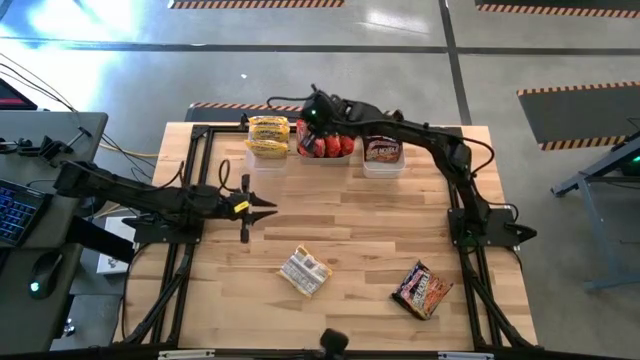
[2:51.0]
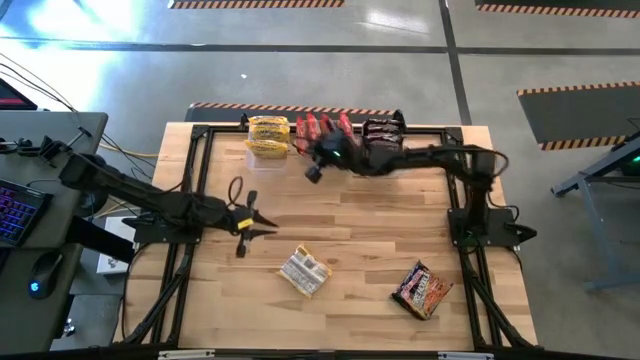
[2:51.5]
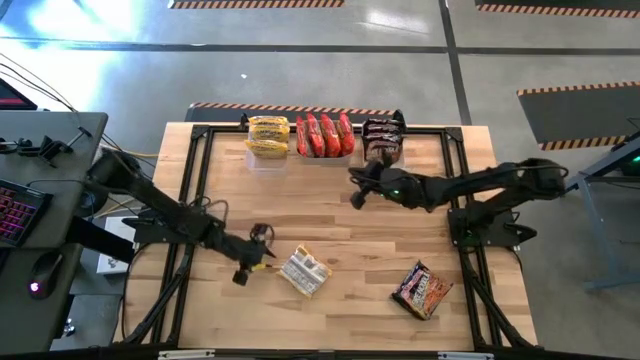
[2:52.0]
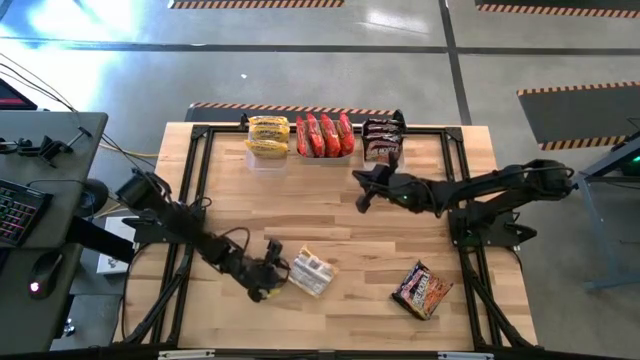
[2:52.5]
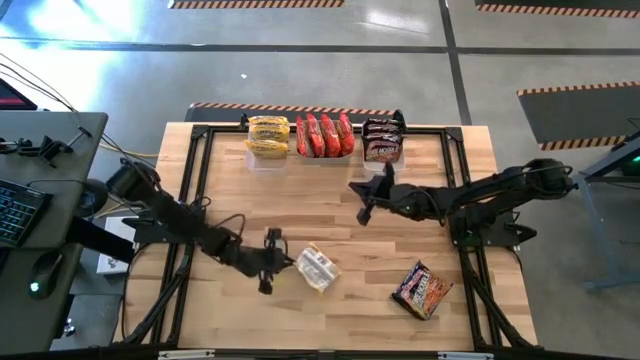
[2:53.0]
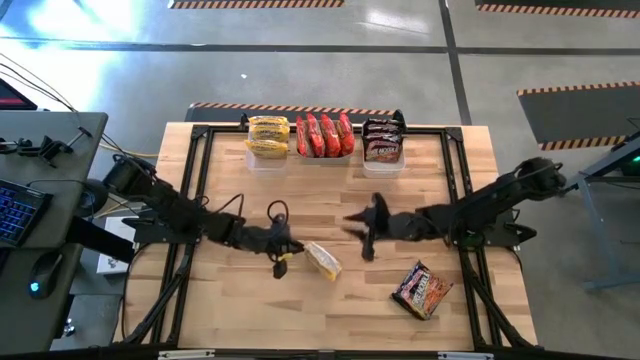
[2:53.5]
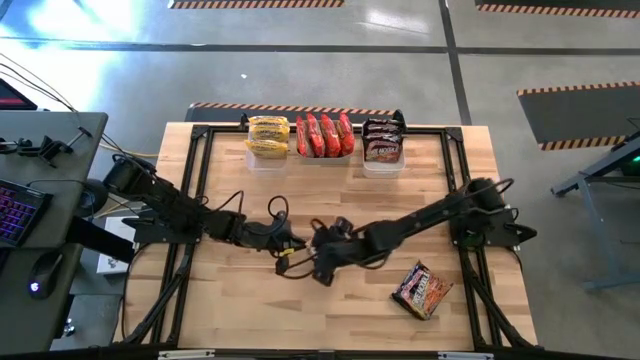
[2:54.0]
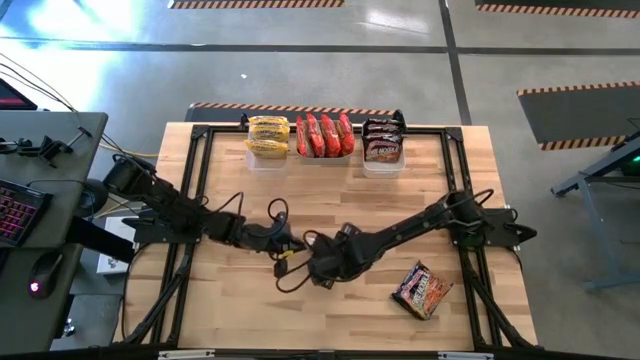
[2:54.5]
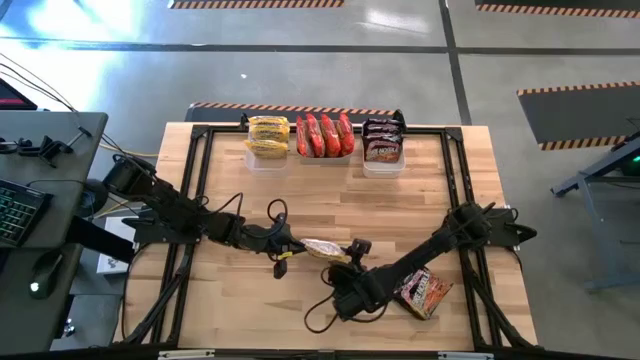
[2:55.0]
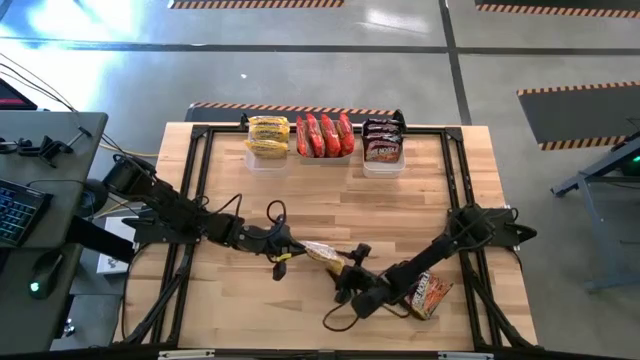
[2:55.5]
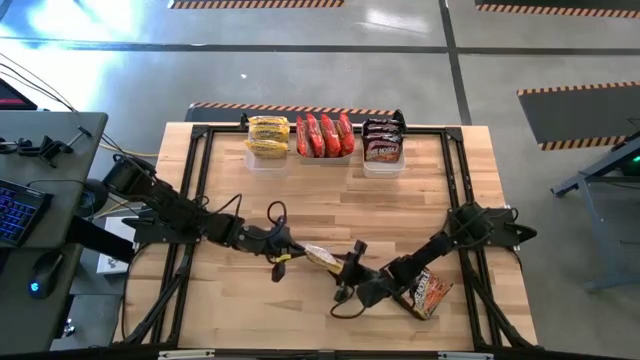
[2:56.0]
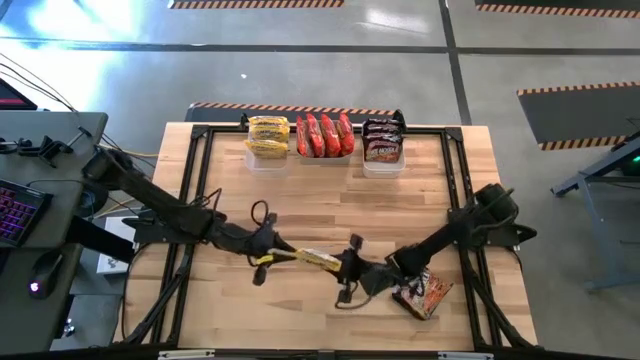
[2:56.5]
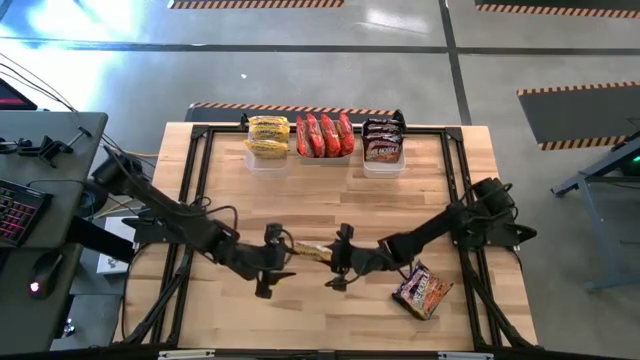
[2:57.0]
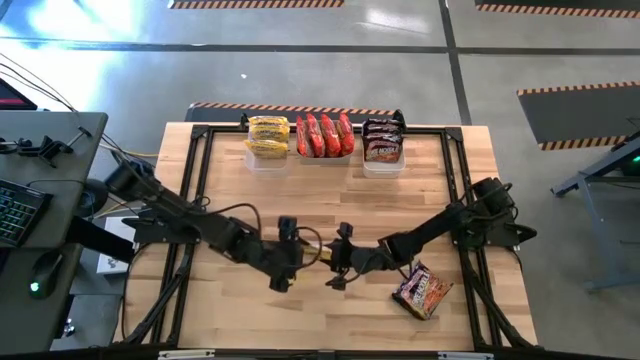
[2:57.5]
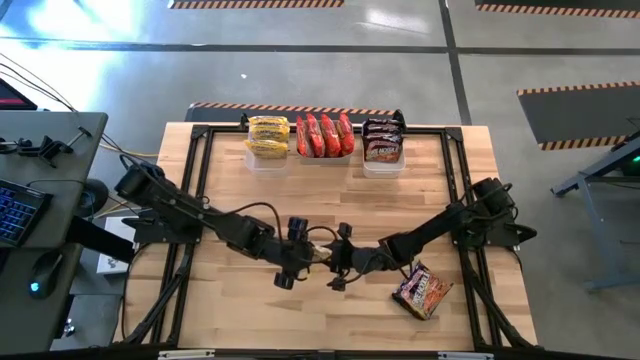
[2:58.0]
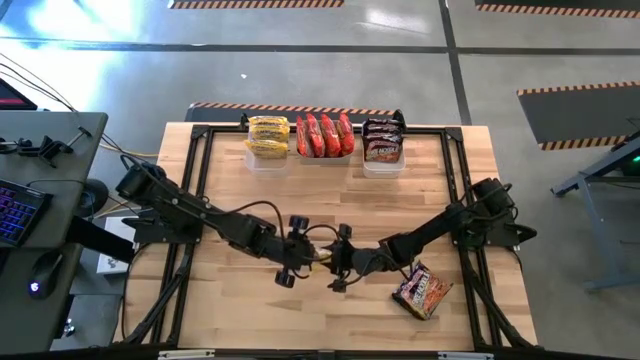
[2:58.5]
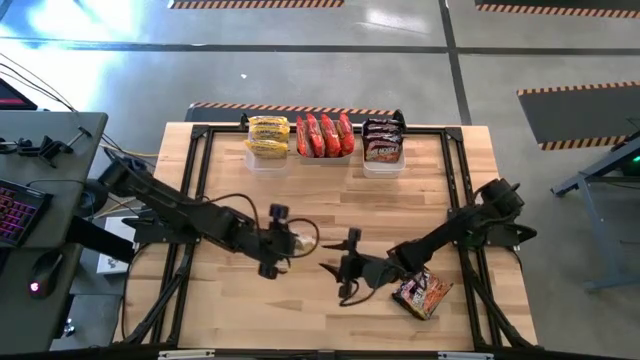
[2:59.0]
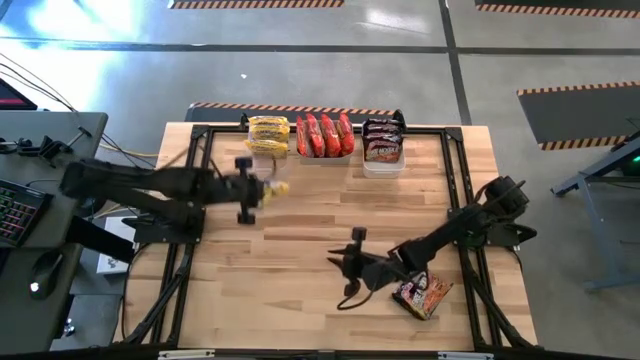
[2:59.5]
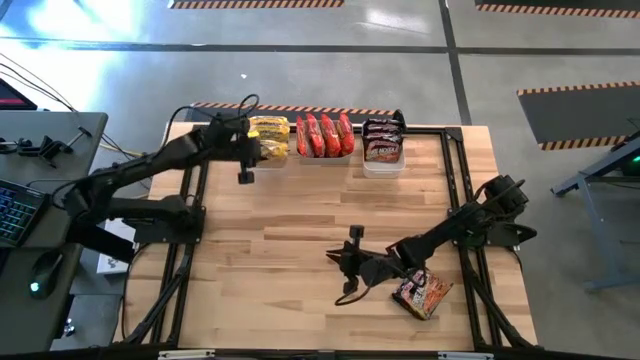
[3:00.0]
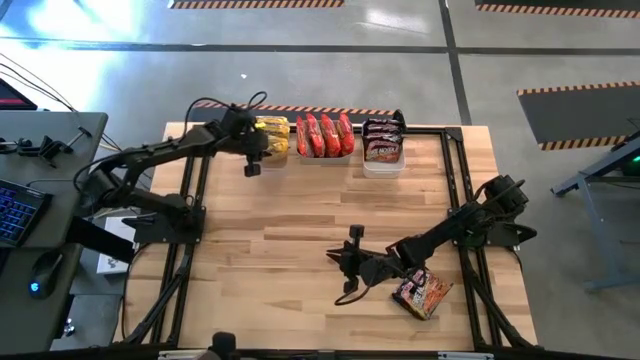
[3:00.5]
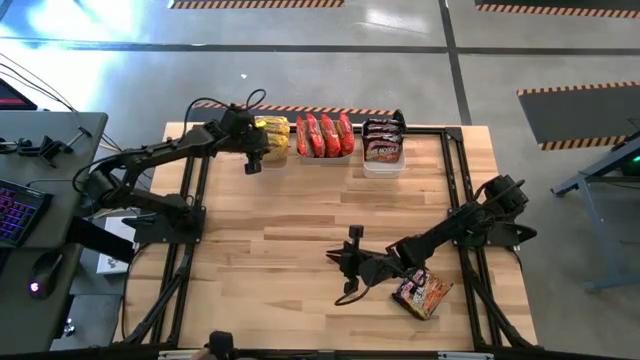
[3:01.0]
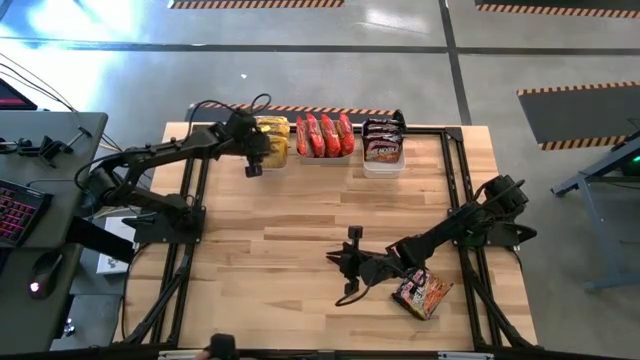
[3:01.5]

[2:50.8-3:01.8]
Task: Sort Maruchan noodles
Put the yellow noodle pack into the transparent bin

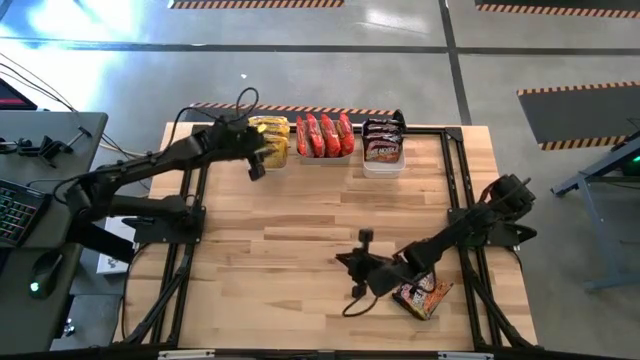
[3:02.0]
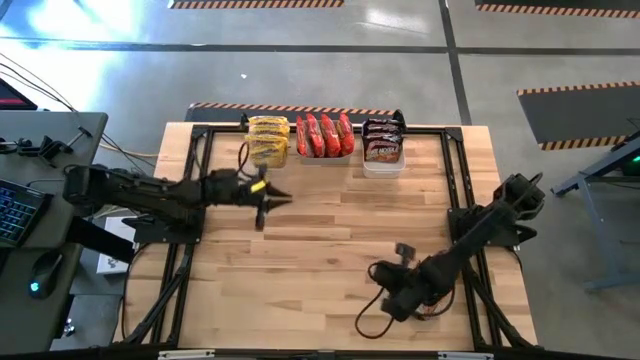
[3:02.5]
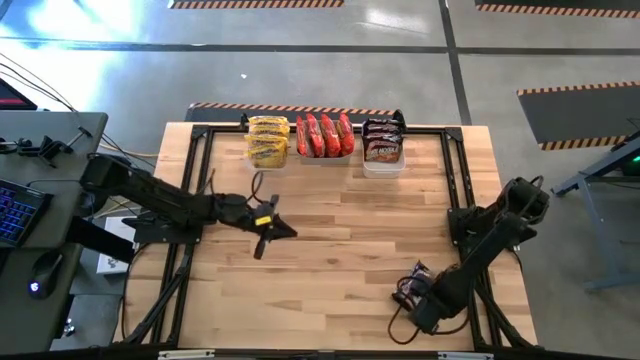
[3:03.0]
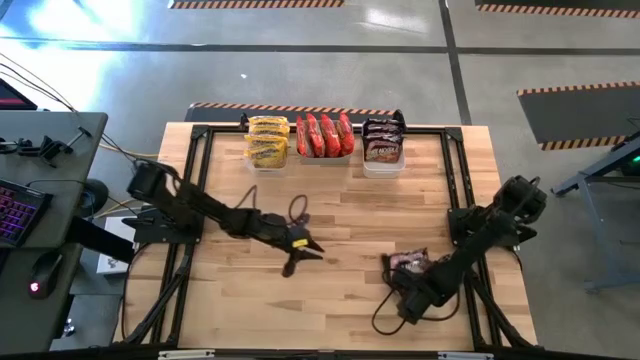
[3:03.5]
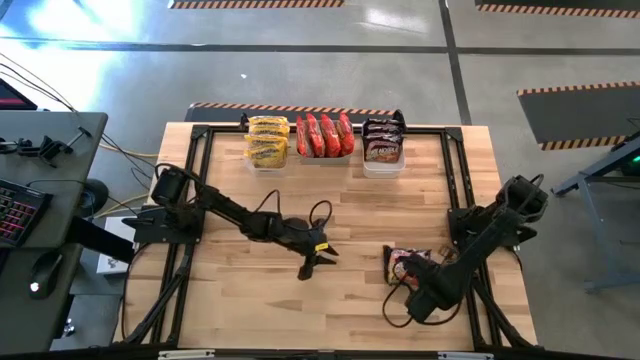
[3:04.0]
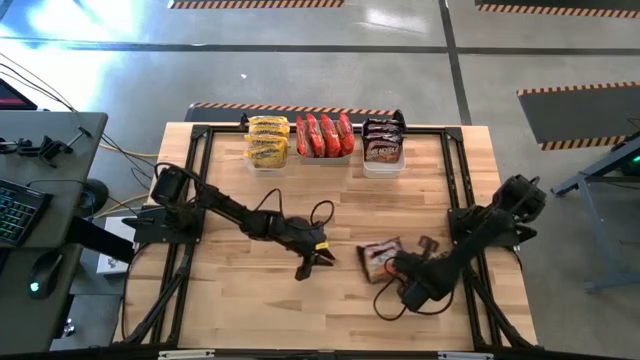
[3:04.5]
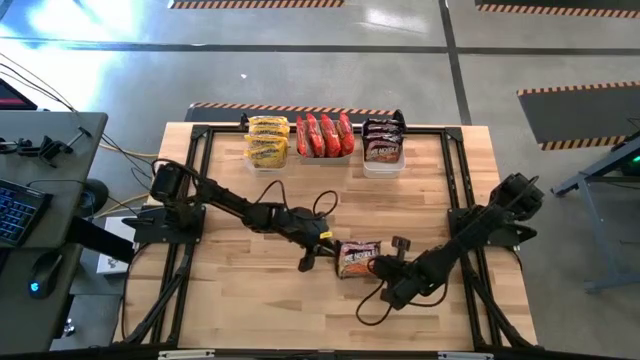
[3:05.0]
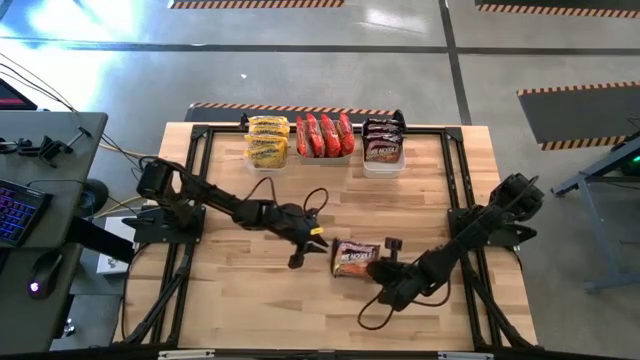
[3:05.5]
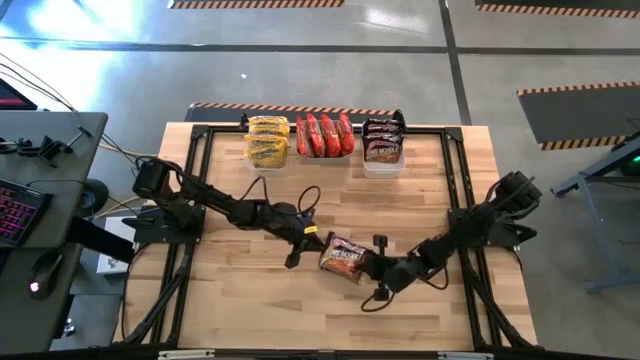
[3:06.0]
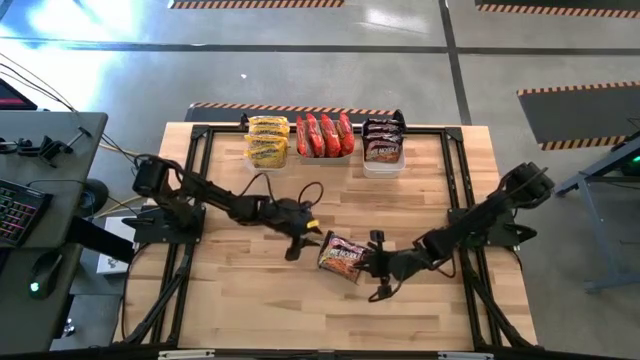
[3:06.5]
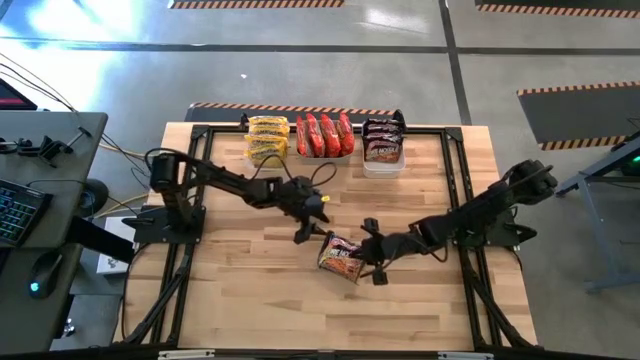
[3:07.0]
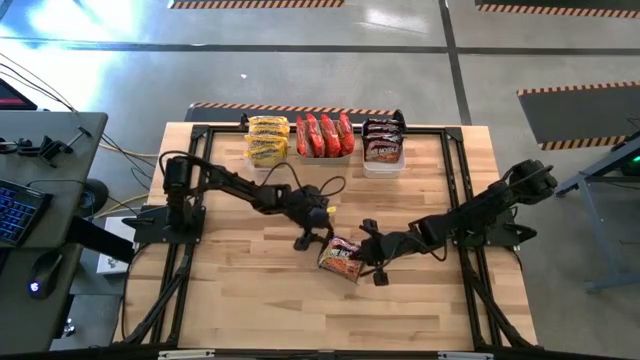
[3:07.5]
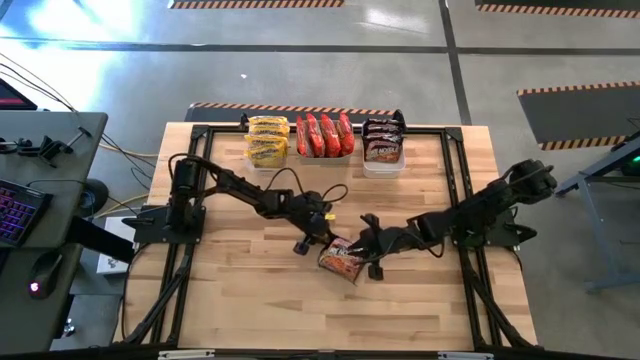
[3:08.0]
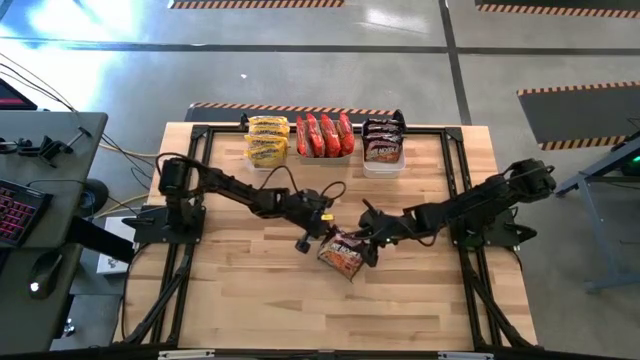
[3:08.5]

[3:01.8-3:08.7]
Put the black noodle pack into the white bin

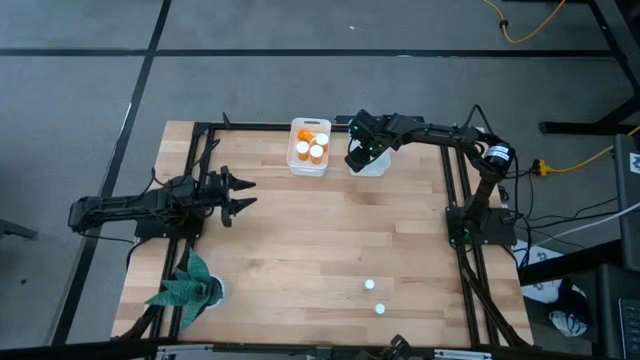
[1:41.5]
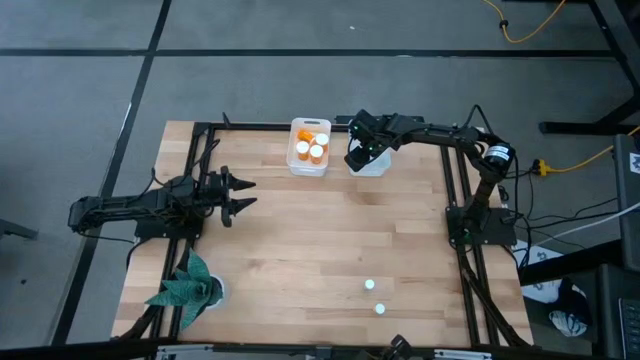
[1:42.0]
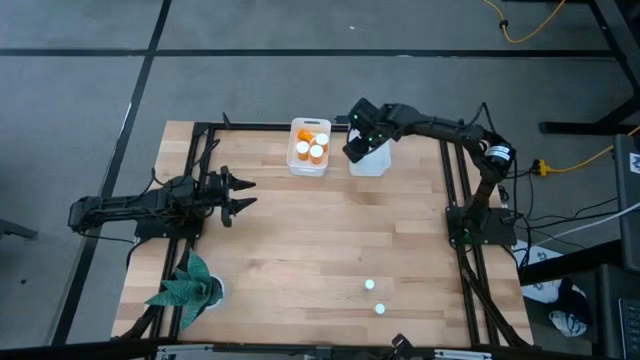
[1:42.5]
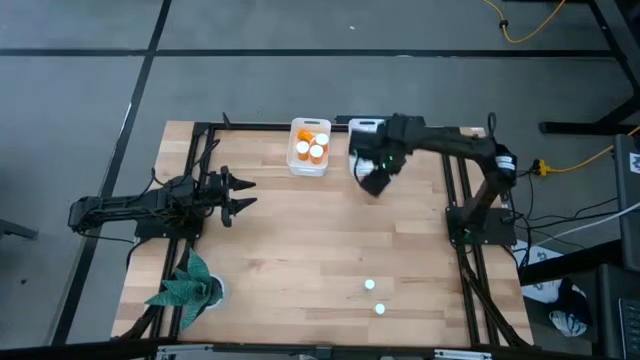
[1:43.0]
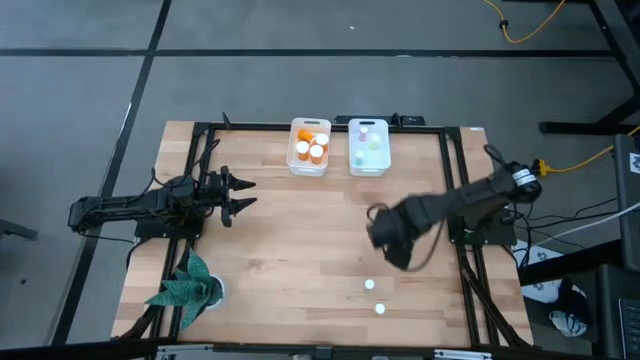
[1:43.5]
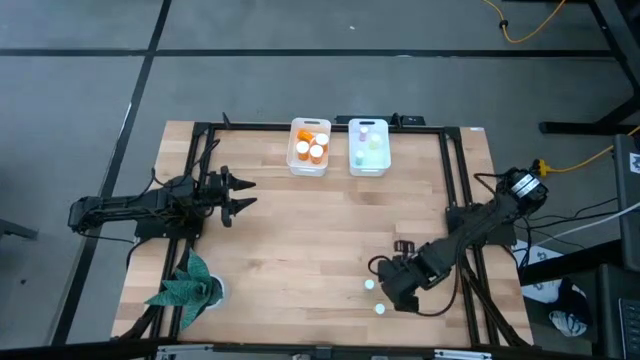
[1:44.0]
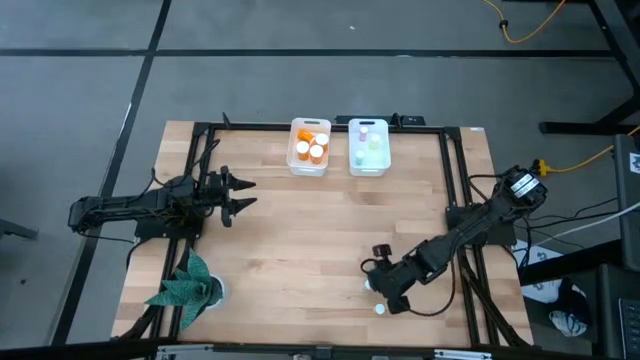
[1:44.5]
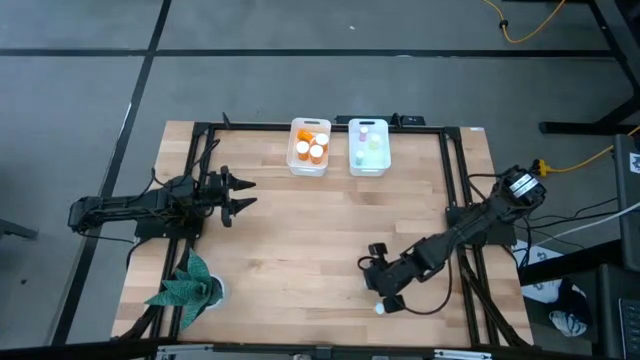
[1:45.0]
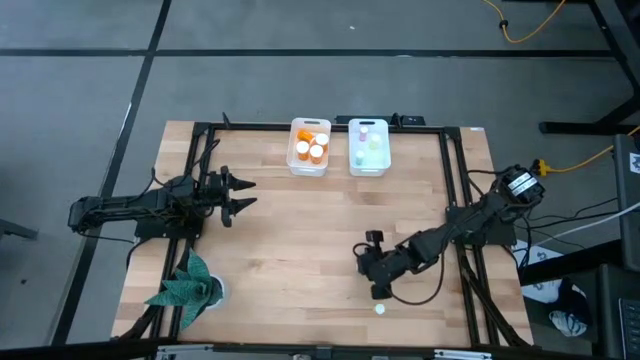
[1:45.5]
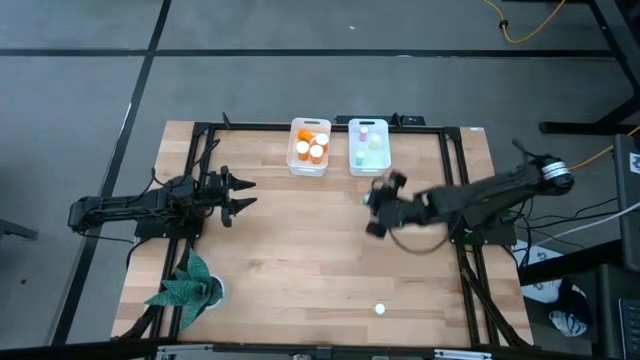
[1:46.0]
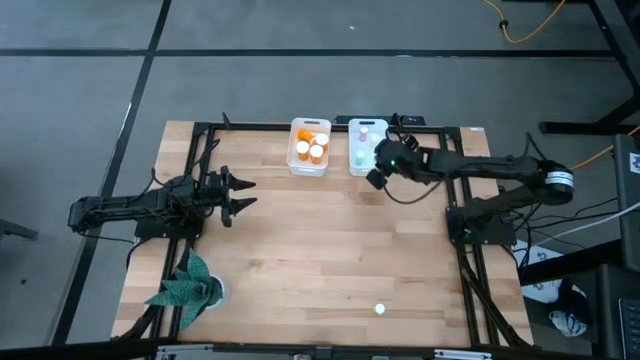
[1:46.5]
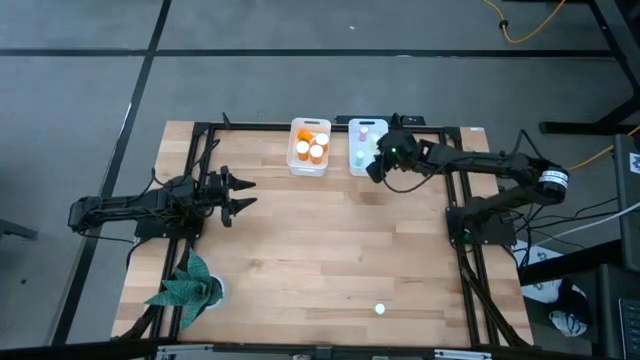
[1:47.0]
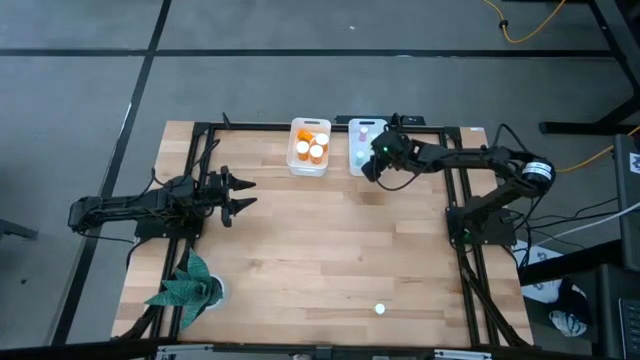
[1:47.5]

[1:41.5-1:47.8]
Task: Pick and place medicine bottles into bin by pill shape (circle, oval)
Put the blue tablet bottle into the right white bin
